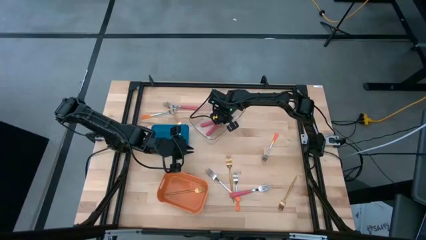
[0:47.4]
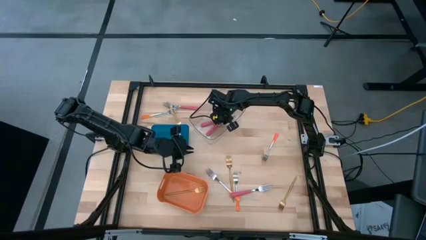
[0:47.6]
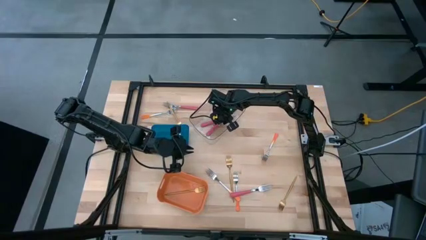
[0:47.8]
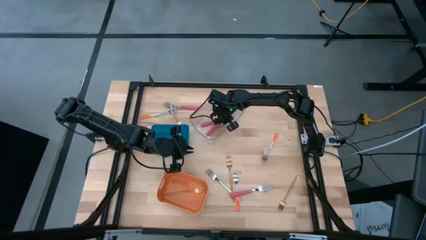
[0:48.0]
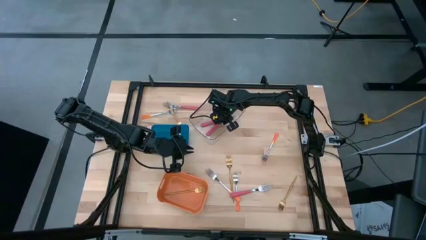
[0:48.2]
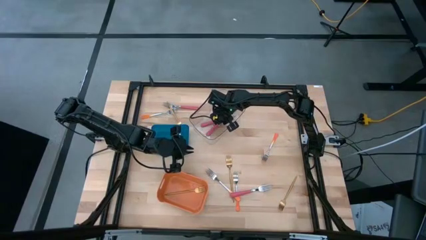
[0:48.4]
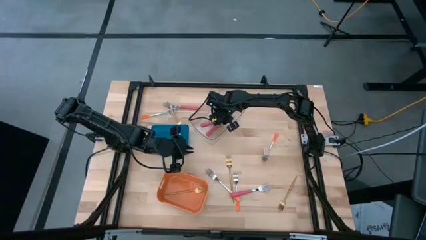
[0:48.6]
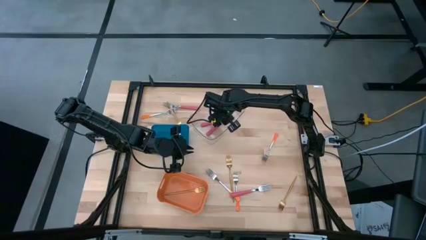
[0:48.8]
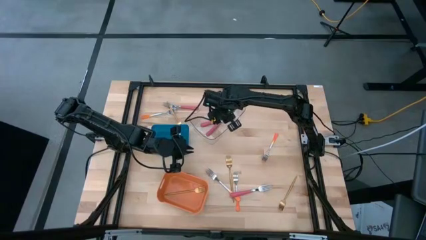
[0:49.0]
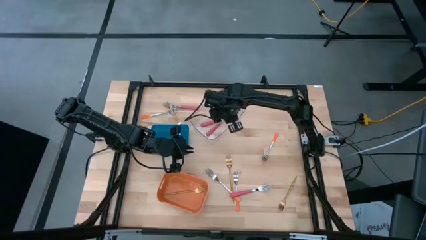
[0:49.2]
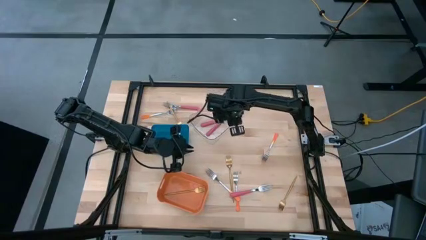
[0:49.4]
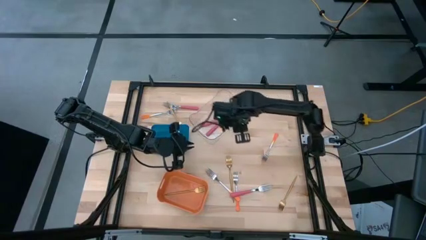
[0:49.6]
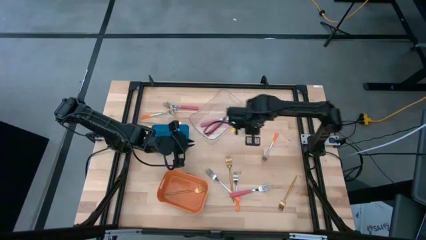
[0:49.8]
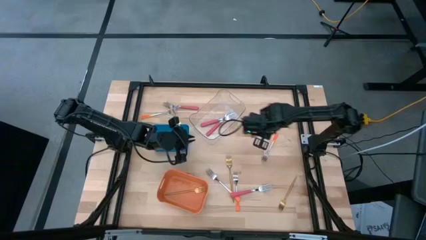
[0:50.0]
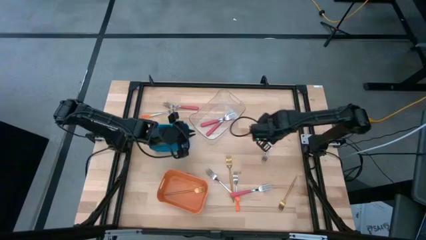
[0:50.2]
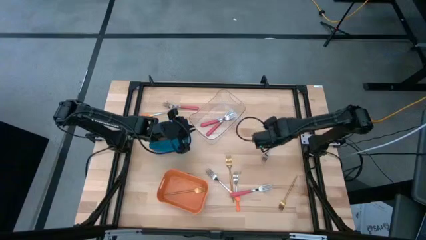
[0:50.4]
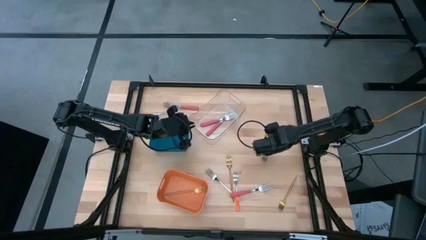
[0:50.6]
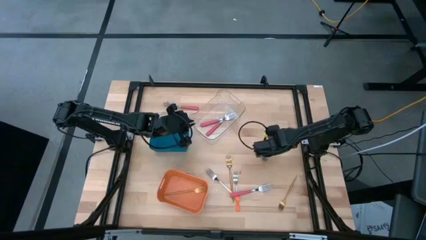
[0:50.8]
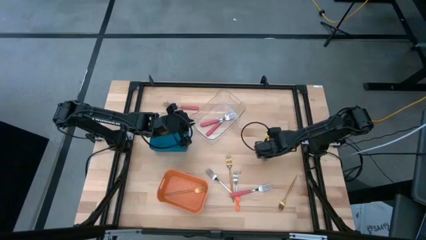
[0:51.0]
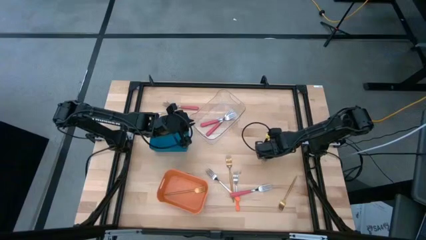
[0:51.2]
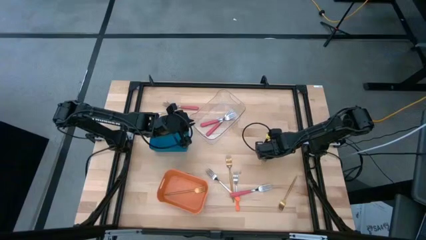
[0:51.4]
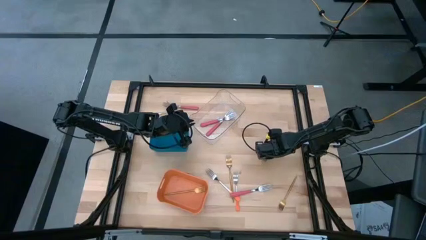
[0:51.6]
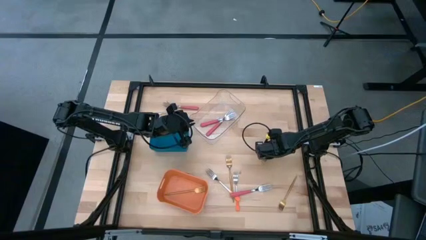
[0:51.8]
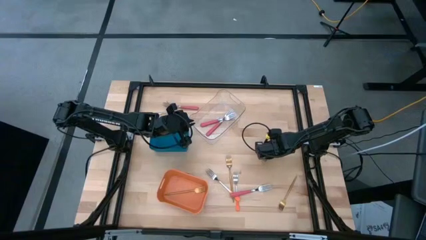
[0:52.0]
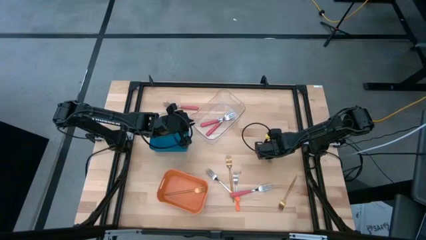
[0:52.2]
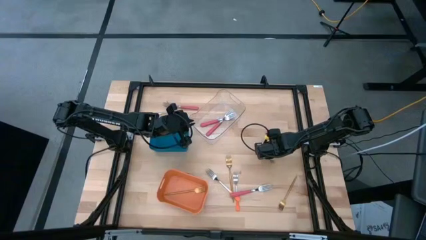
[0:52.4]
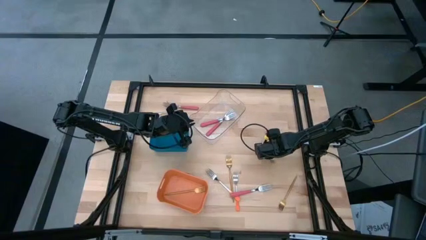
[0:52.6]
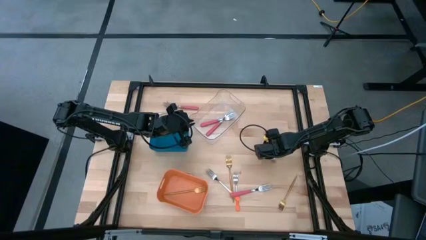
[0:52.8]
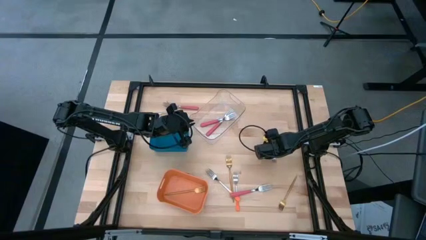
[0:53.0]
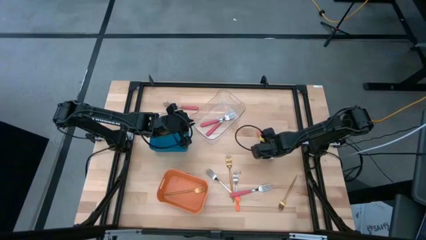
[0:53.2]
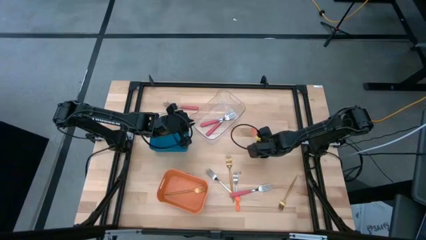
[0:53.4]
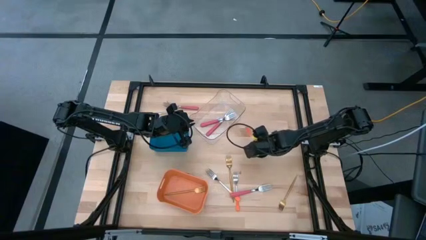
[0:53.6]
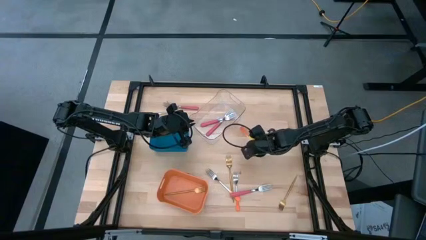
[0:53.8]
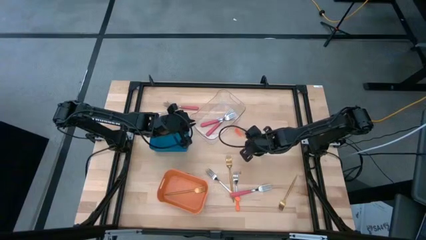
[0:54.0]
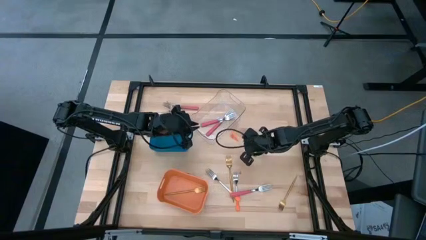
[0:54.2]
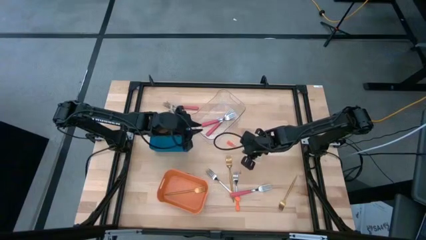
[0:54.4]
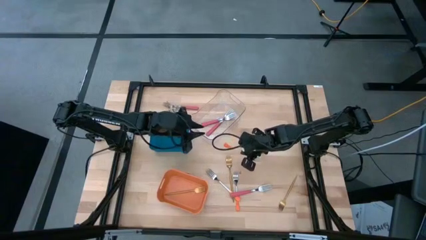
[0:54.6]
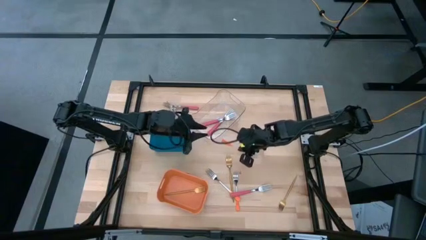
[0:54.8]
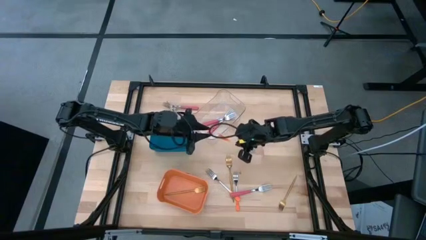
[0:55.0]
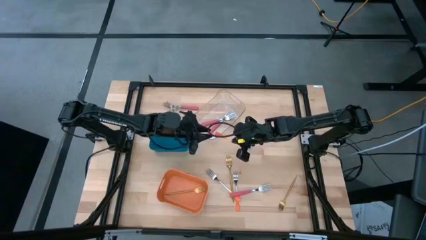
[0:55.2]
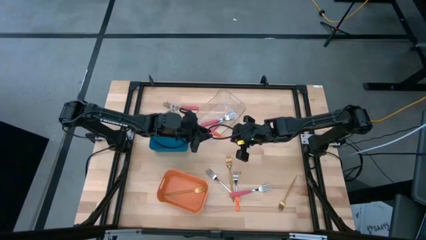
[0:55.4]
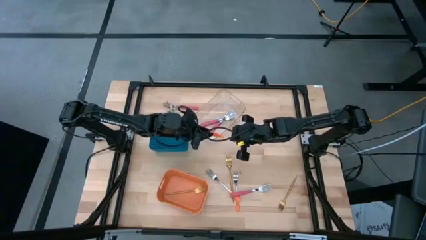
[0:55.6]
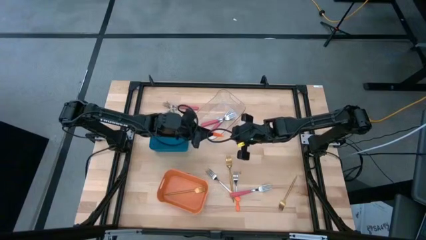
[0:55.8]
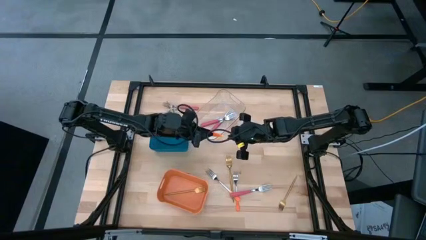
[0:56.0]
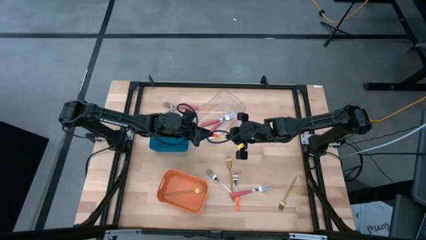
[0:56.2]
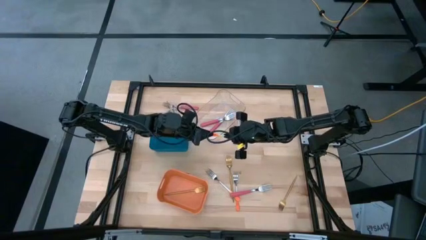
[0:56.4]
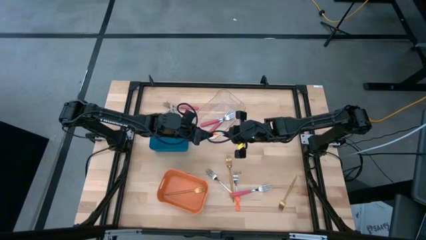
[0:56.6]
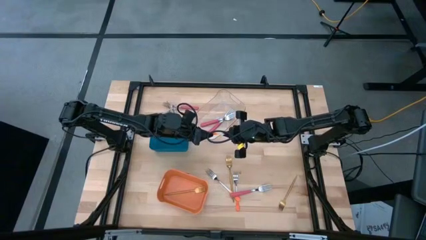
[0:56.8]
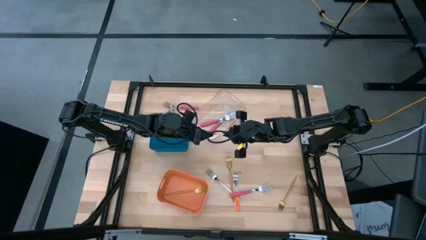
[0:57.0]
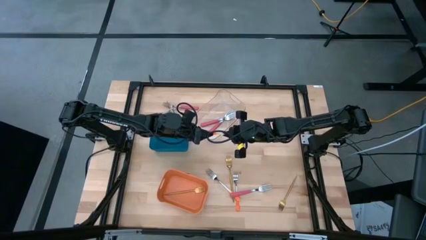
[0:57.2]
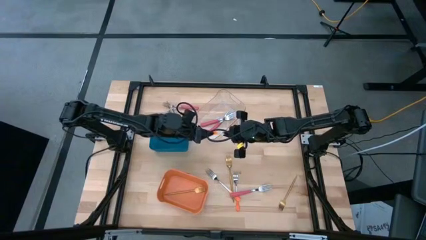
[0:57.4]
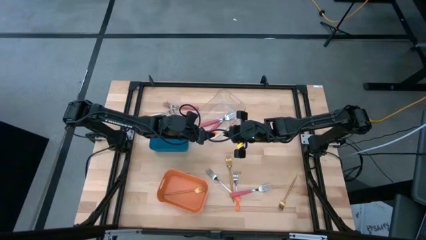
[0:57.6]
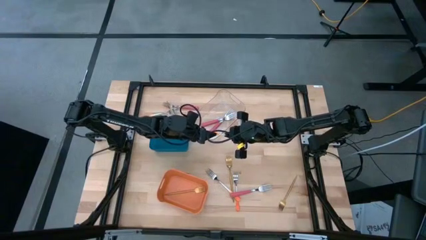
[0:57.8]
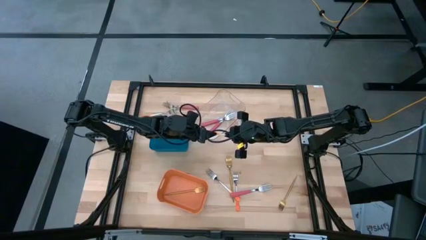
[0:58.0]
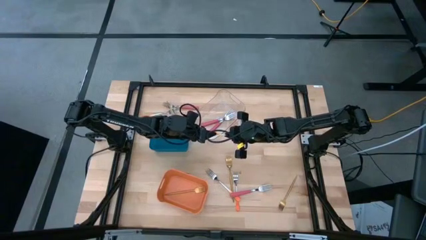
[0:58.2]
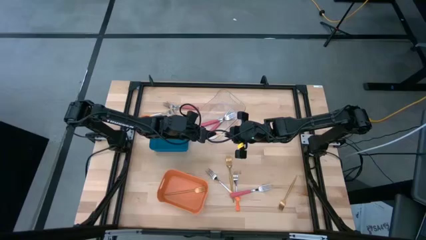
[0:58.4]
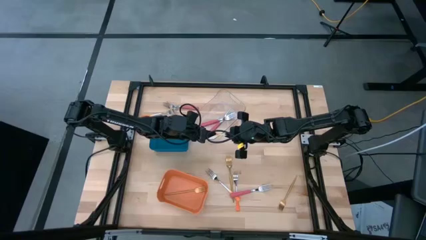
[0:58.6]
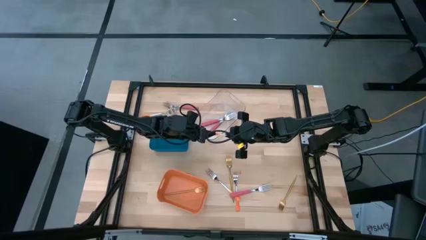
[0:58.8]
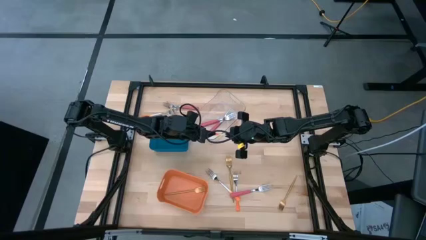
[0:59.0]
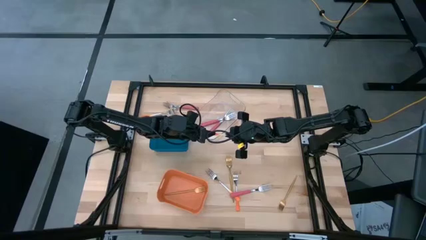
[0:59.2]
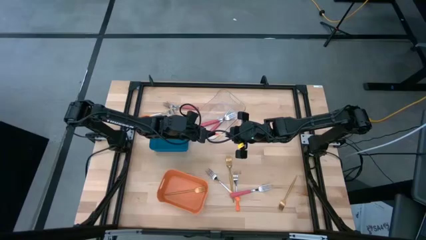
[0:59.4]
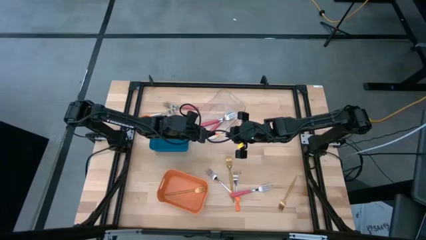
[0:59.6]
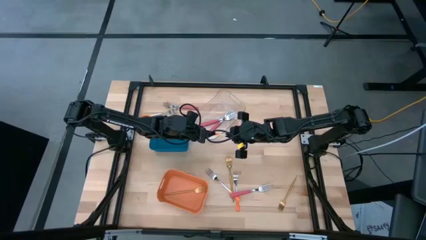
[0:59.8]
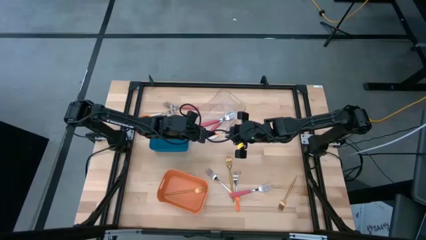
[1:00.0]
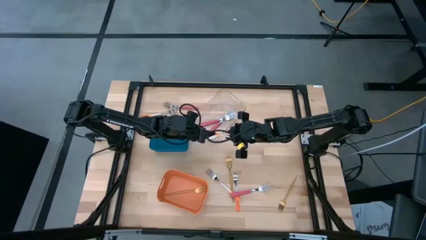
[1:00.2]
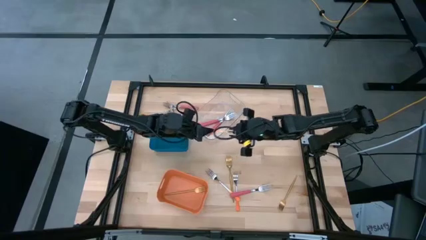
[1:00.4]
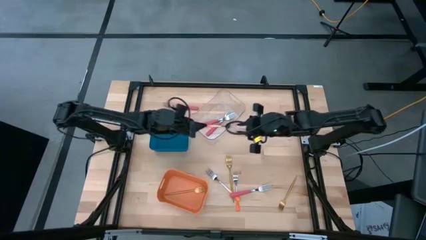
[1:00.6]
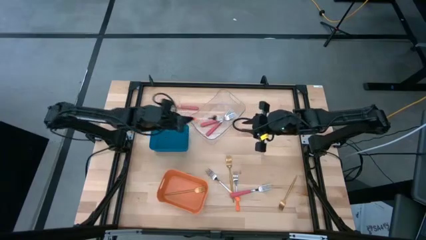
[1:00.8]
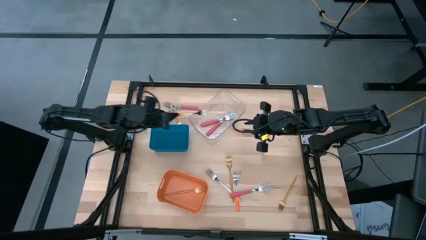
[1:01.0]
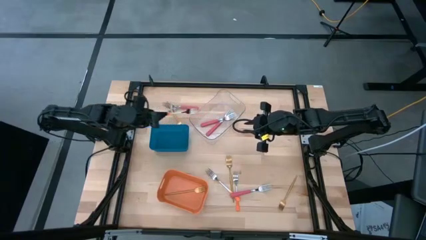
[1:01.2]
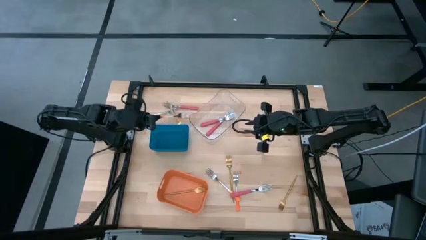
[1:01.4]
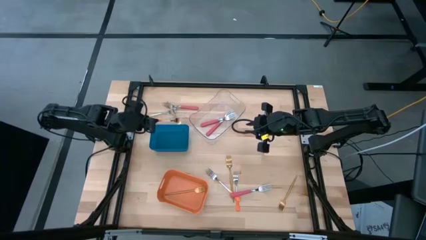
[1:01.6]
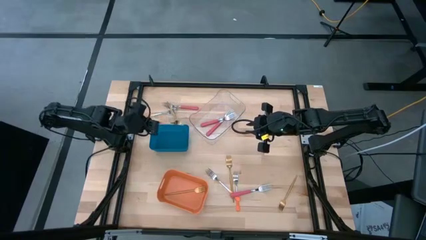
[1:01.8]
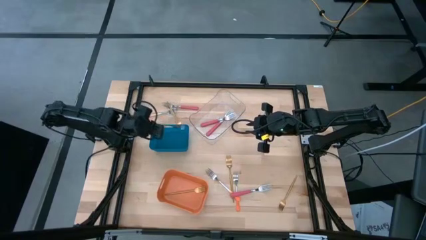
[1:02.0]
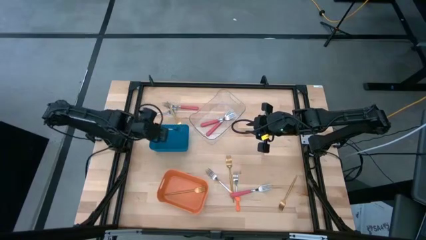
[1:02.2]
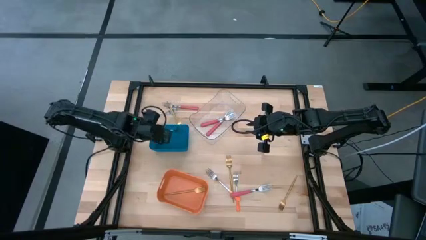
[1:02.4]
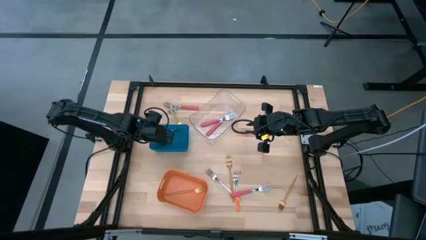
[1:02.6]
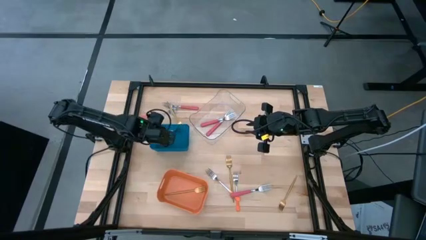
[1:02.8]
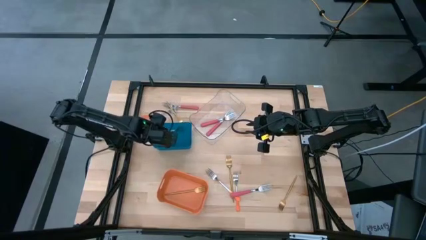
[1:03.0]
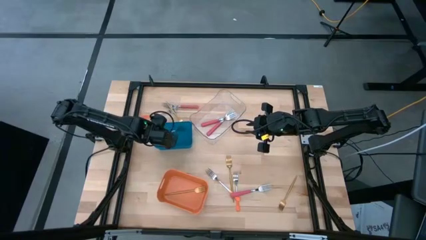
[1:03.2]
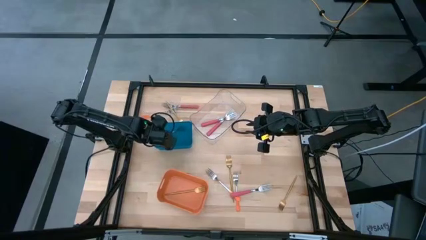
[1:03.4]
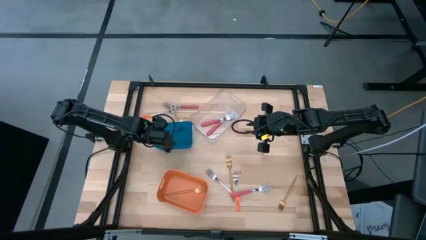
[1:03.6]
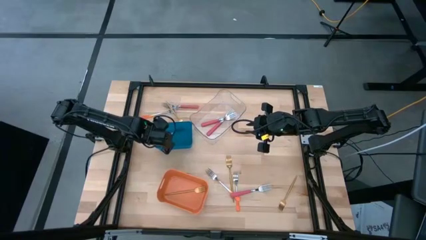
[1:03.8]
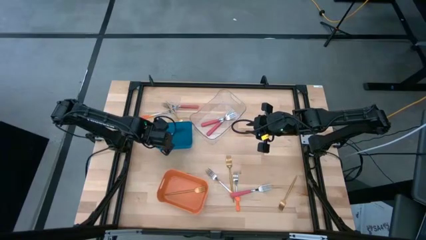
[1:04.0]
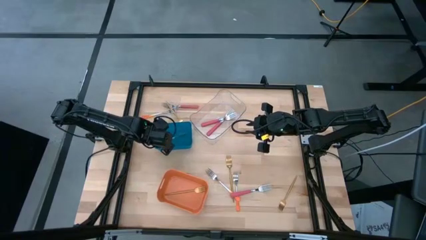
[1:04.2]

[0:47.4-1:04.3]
Task: Sort silverware by color (type)
Put the orange fork into the blue bin
